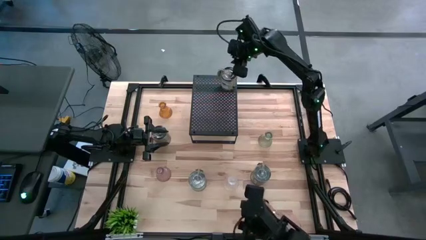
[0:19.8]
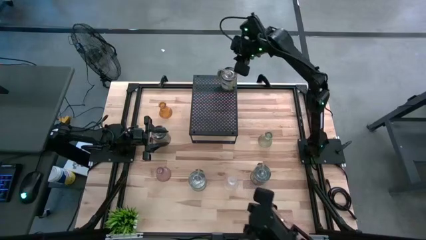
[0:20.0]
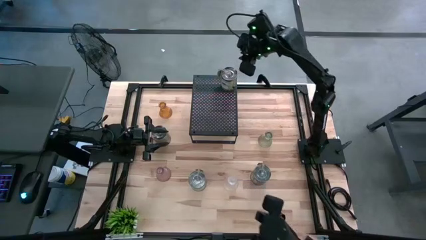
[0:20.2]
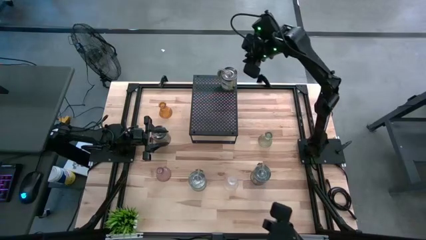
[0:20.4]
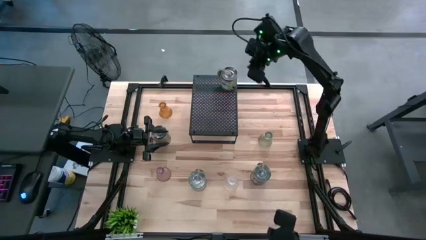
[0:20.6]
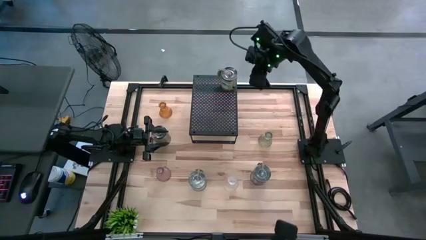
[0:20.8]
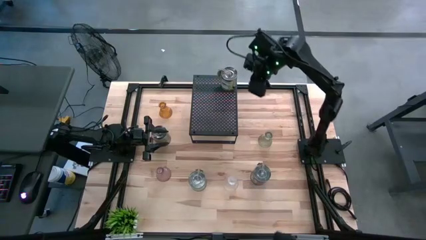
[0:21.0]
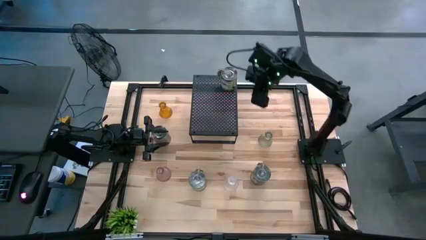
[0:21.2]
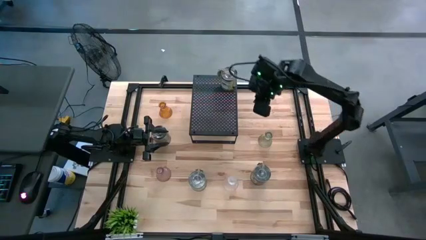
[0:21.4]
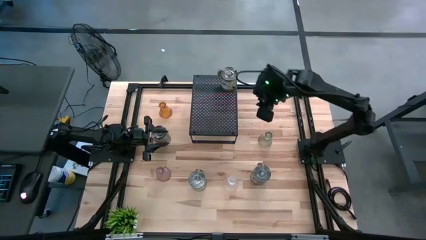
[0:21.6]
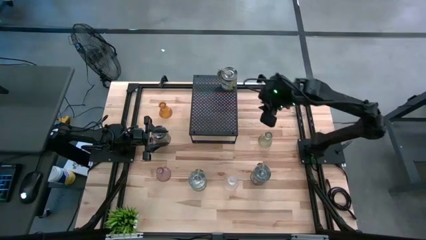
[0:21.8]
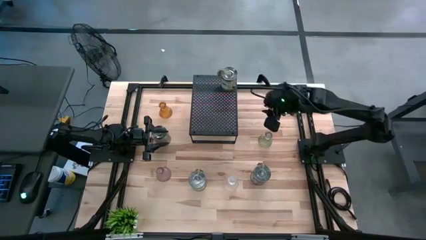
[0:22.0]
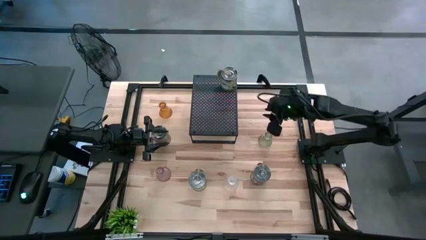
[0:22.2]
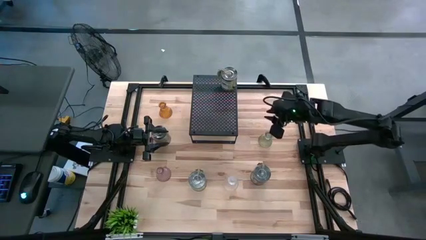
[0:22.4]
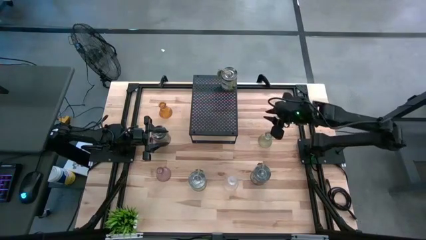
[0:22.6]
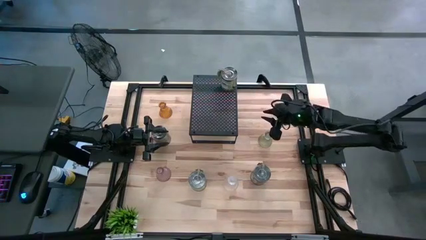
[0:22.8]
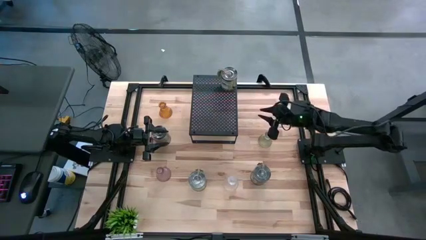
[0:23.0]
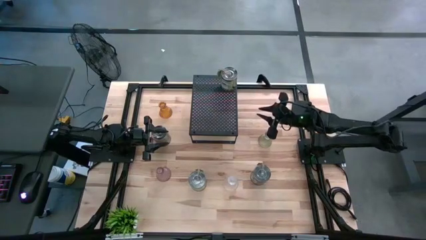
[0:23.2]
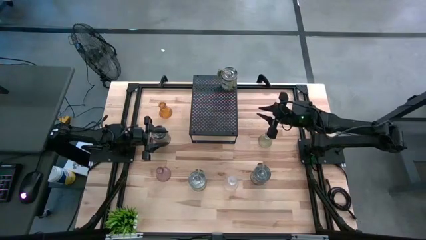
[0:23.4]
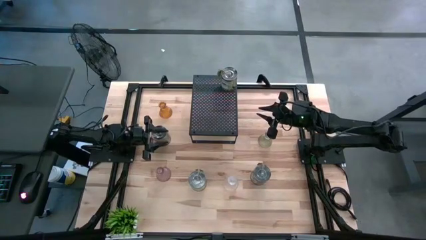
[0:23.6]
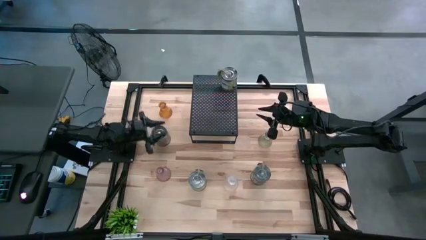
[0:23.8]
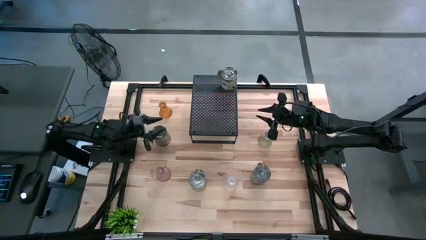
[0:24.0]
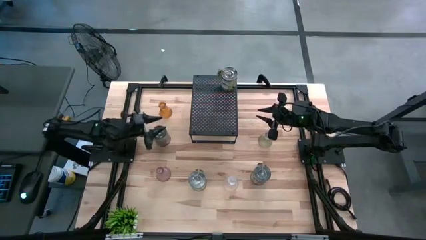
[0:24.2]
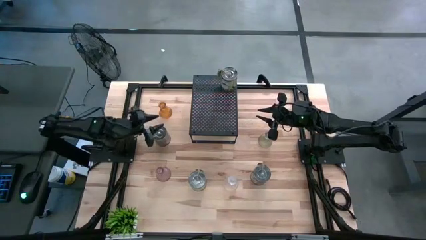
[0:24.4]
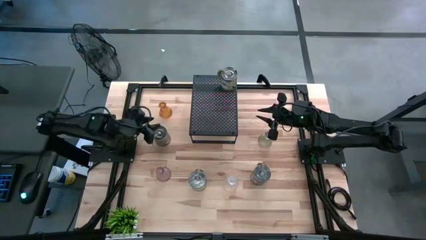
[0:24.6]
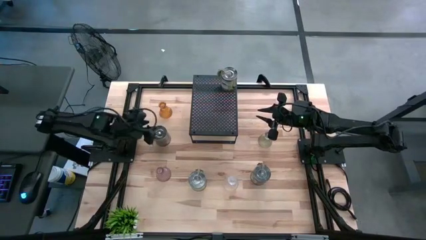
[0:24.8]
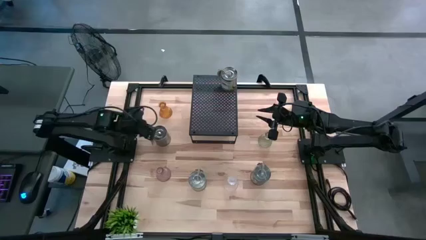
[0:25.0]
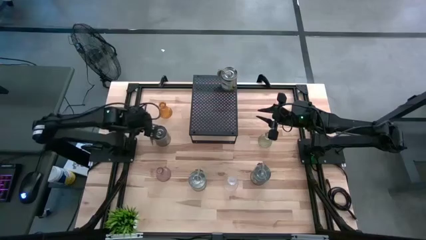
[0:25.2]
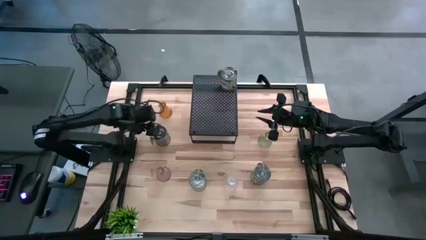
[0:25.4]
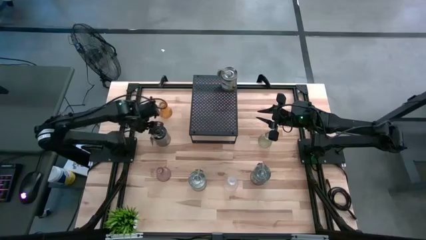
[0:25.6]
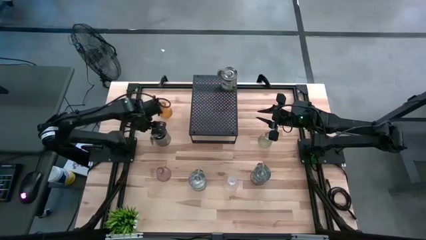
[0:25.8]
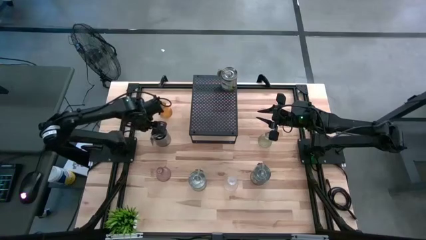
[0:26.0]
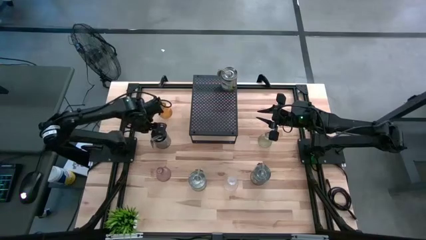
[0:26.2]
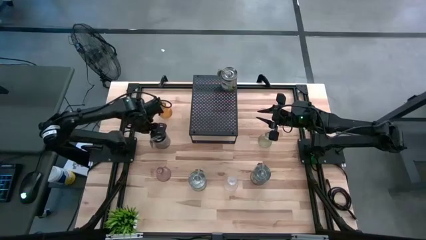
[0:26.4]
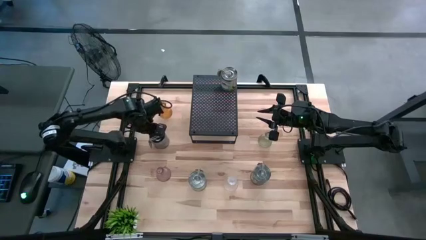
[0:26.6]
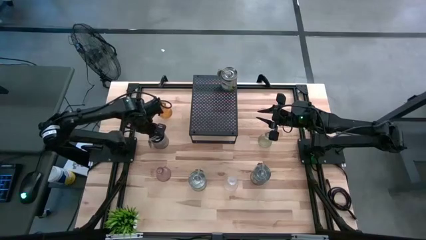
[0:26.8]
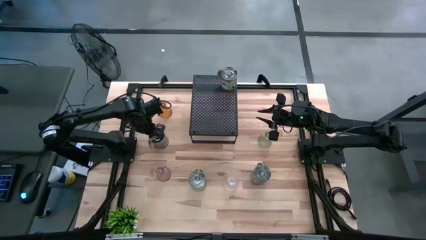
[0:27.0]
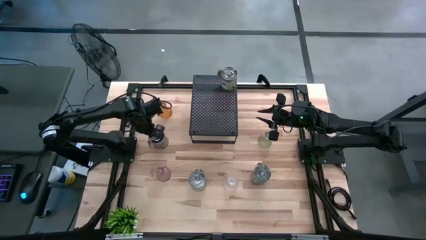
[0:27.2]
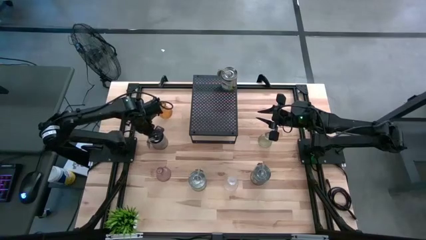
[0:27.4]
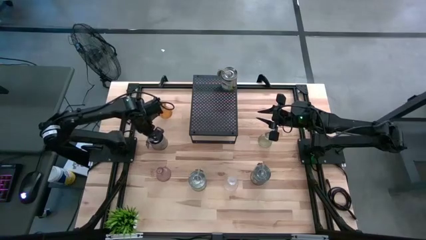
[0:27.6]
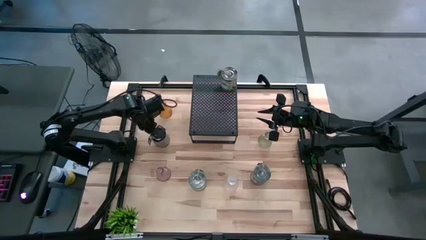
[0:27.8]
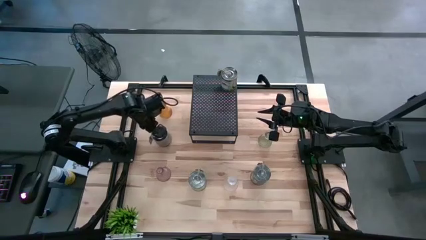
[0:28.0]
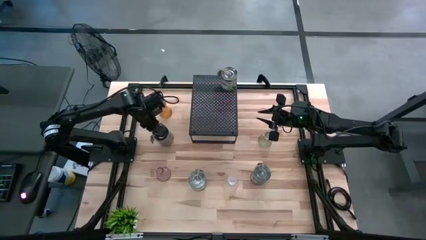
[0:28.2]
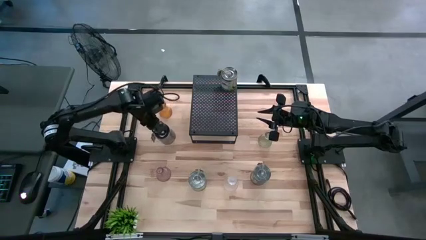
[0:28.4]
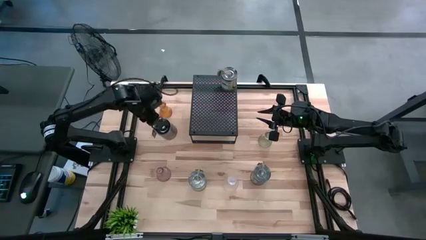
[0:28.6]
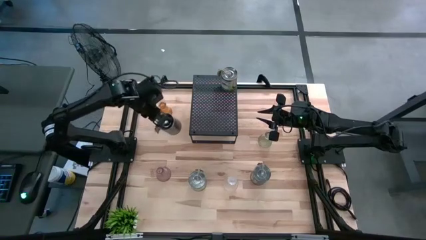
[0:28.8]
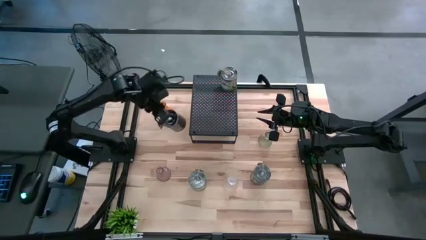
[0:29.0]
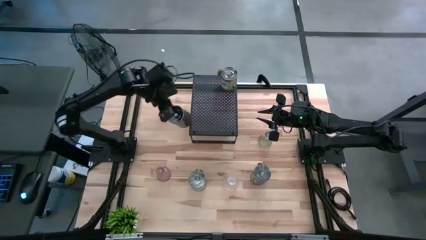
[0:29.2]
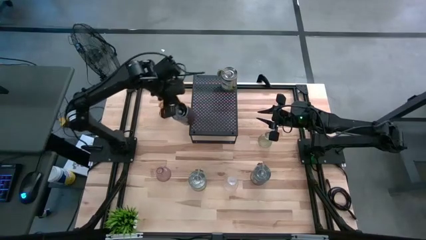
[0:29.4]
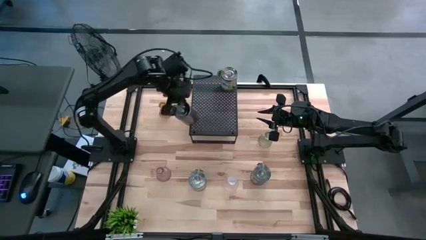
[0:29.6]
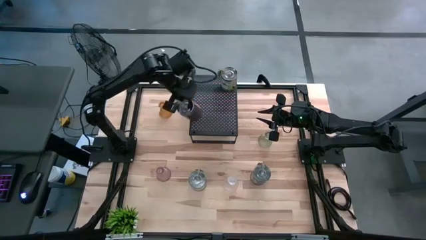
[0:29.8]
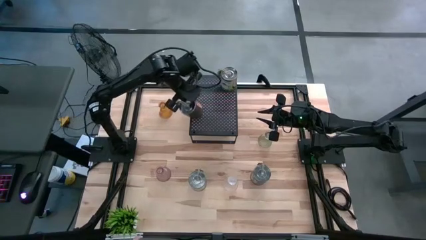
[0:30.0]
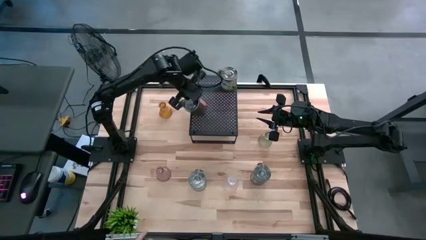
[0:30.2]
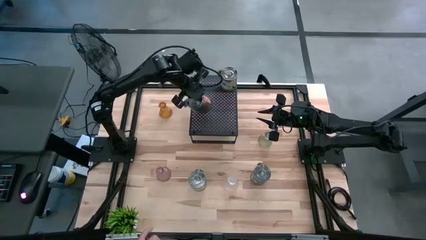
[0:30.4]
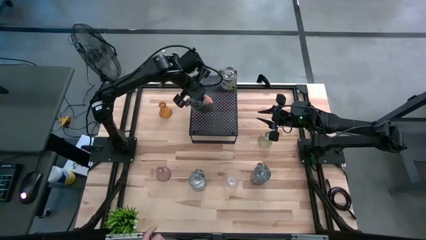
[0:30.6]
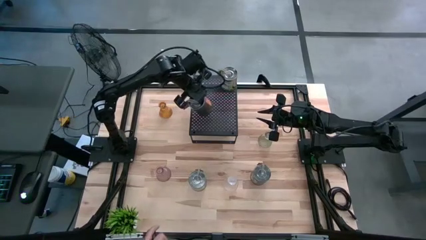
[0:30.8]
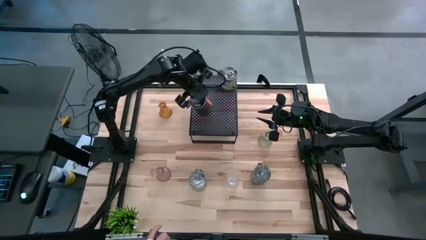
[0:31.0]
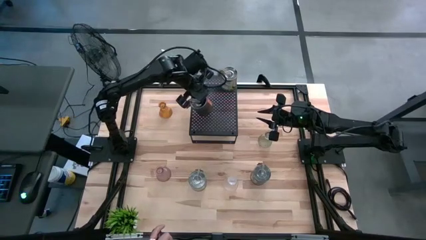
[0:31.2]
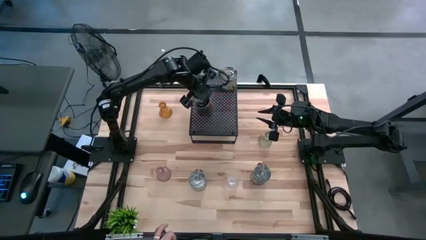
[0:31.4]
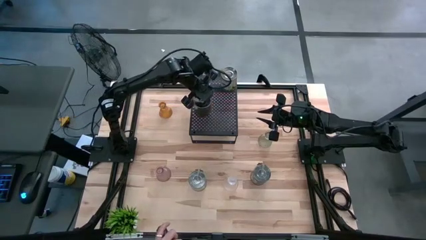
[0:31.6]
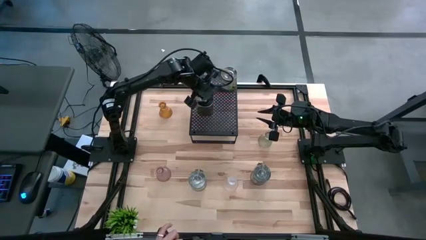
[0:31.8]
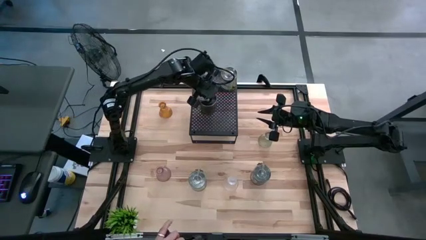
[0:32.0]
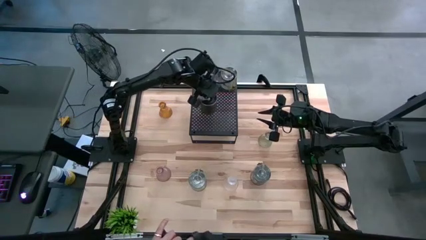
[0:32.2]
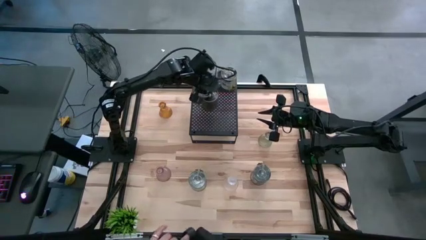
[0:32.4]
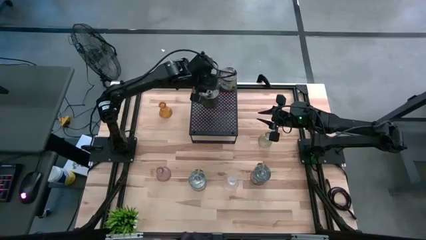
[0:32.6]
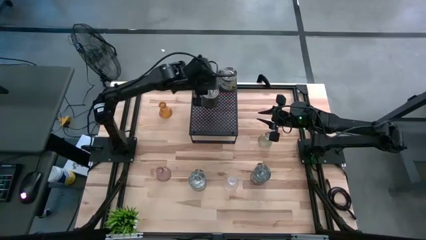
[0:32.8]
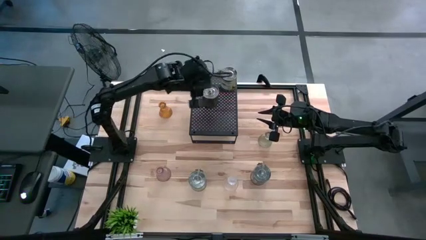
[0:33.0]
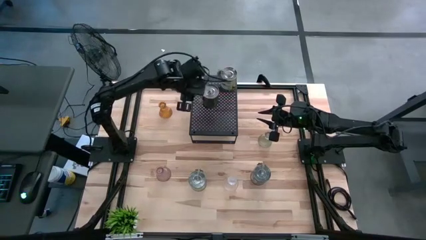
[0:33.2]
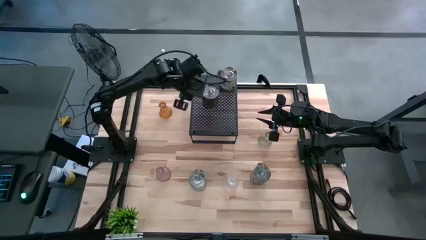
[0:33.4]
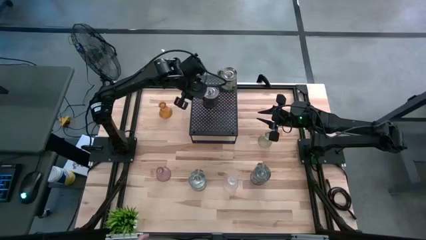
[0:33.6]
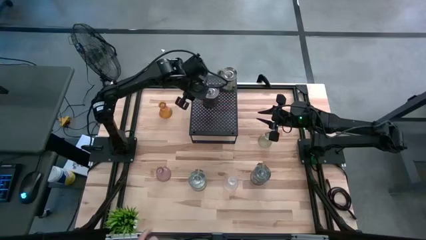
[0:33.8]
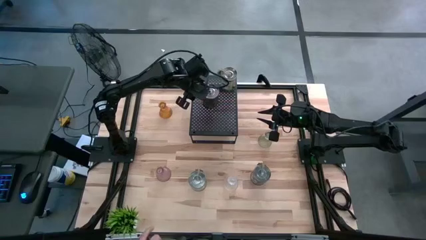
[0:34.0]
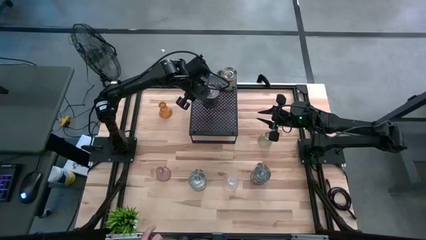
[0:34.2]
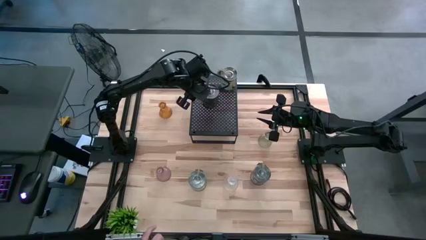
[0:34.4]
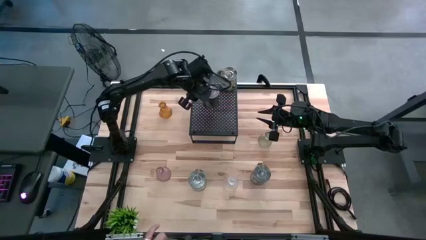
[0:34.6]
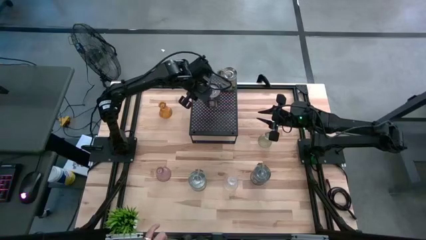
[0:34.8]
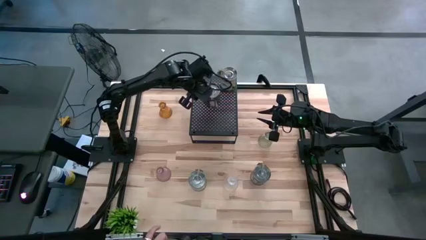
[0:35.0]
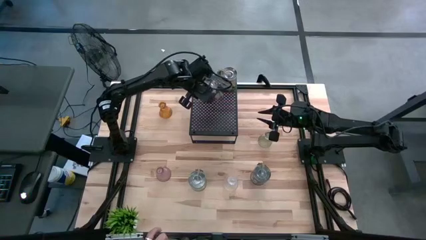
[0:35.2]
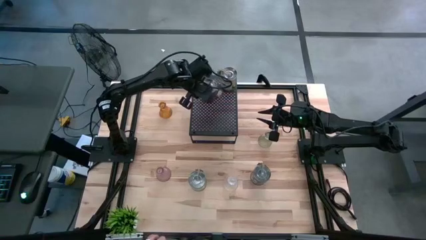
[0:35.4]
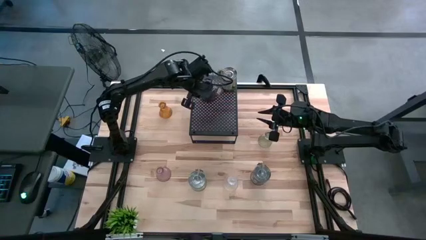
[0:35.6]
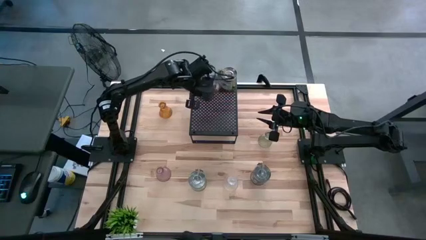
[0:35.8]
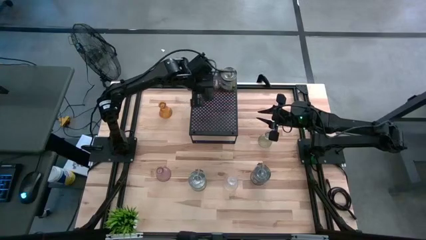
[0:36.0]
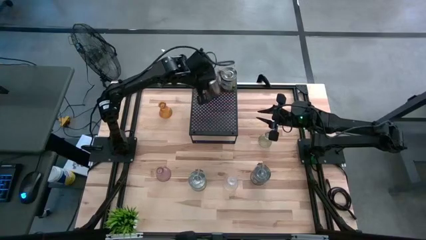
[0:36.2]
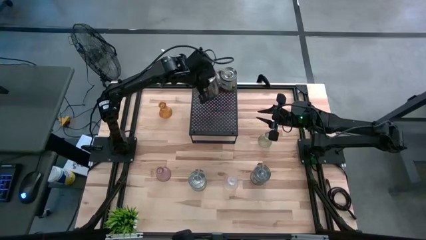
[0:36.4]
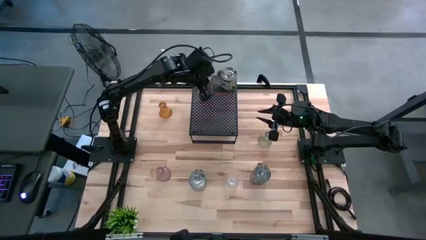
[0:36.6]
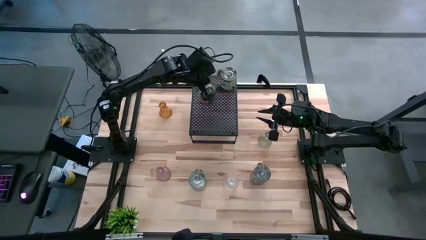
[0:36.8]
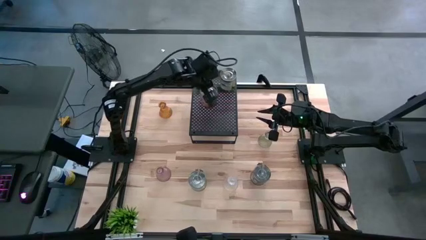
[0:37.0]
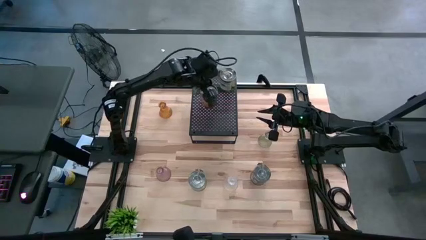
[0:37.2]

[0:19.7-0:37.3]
Task: Pick & Place candle stick holders
Align the silver scented candle with the silver scented candle on the black shelf
